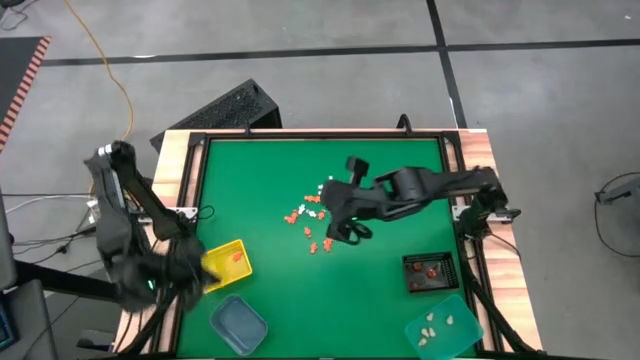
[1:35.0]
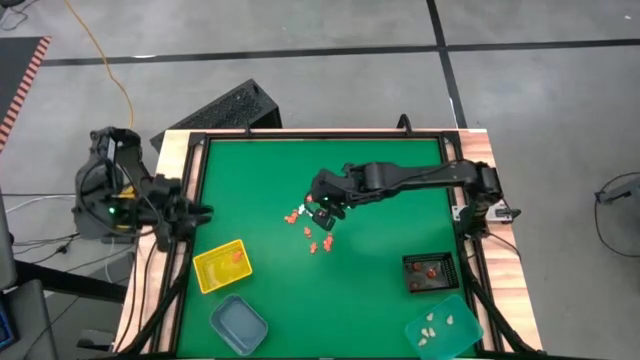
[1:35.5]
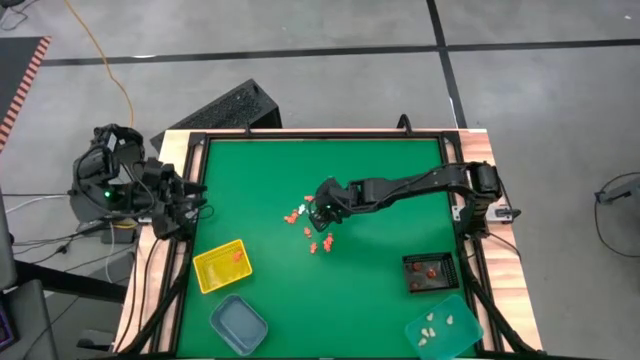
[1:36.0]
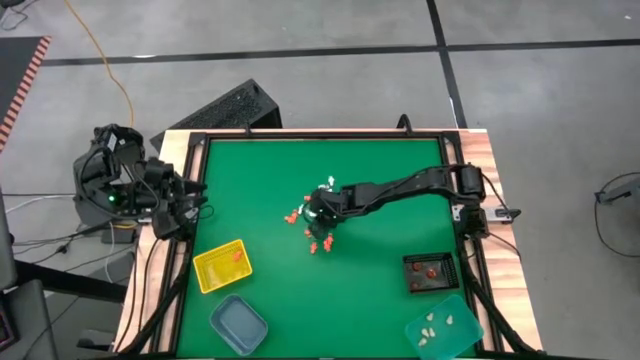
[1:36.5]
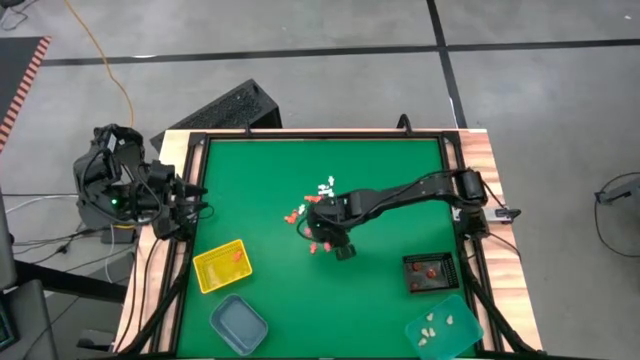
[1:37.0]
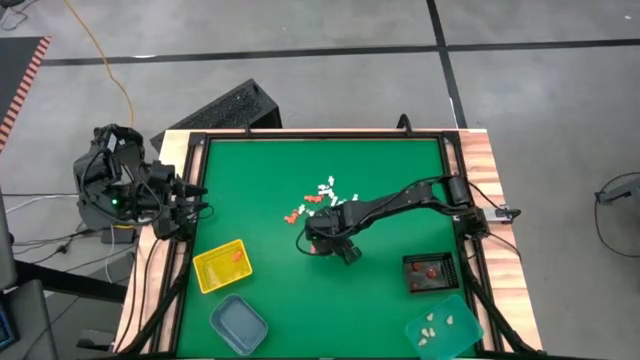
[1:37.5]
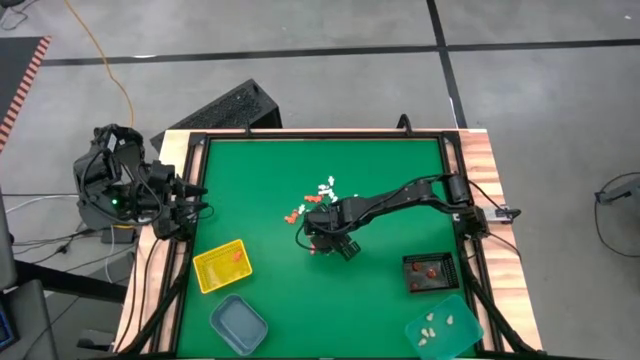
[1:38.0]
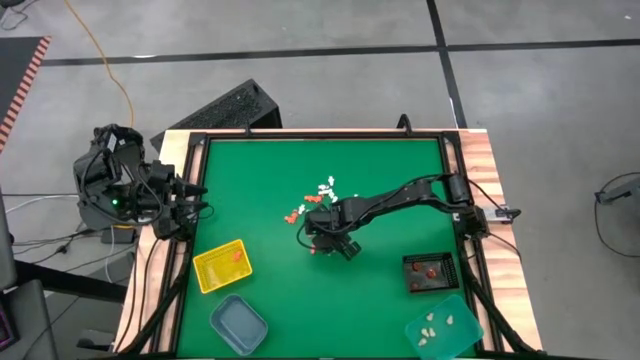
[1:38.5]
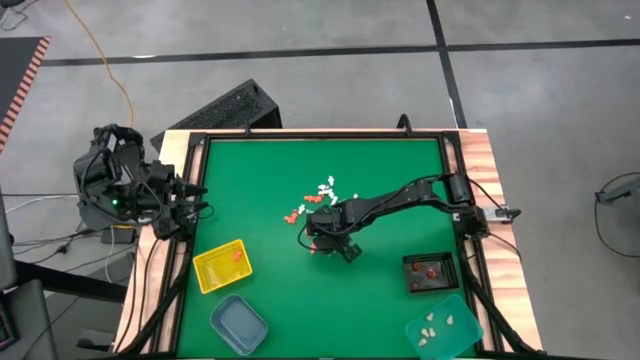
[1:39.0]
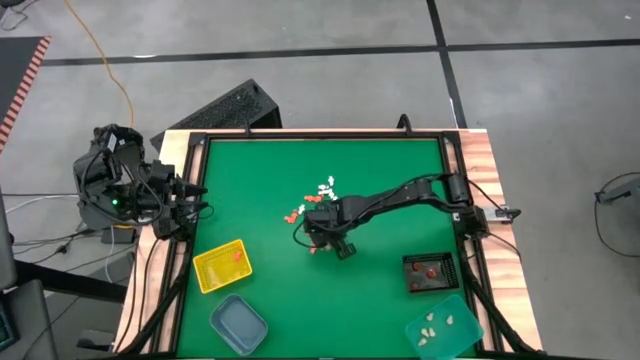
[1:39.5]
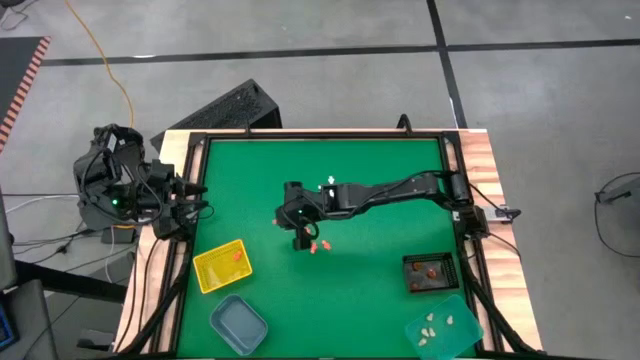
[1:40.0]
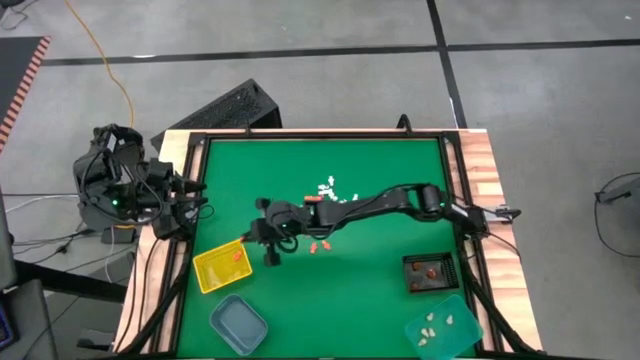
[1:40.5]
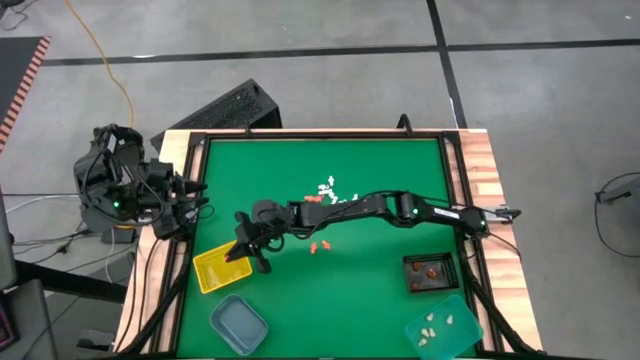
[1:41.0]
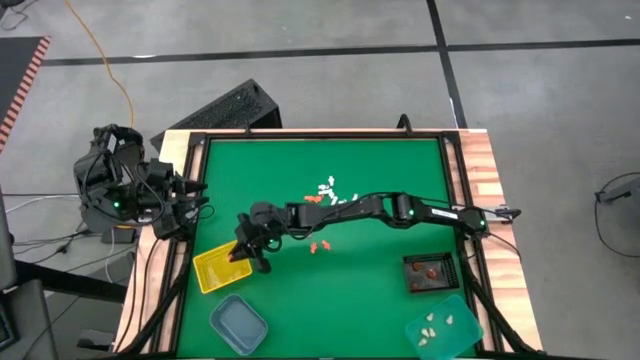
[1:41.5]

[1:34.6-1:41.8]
Task: Sort Halloween decoration
Put the orange skeleton model into the yellow bin

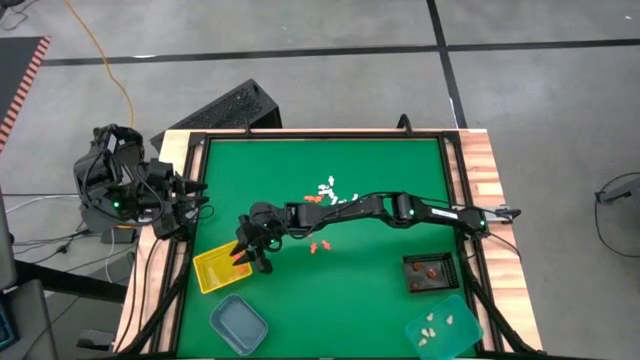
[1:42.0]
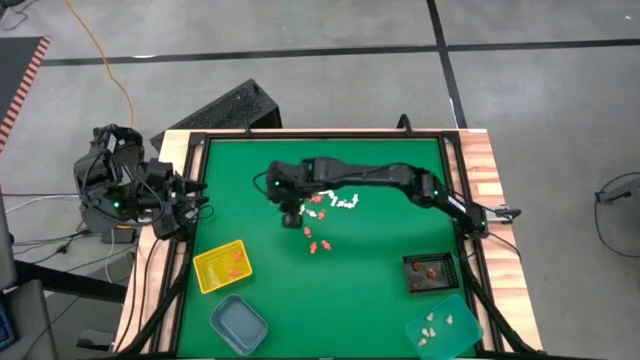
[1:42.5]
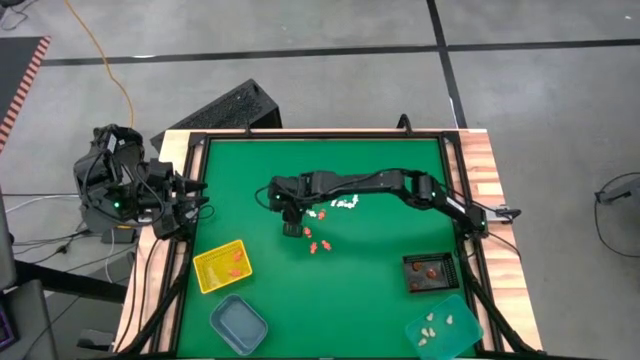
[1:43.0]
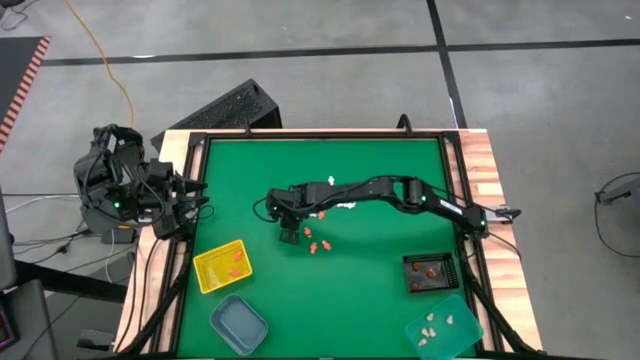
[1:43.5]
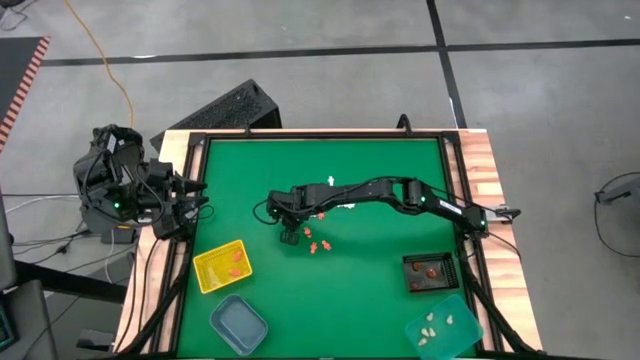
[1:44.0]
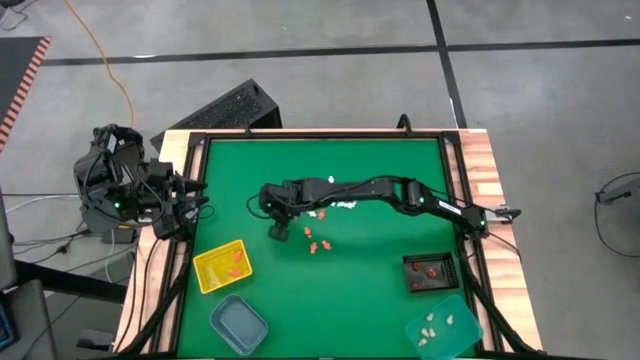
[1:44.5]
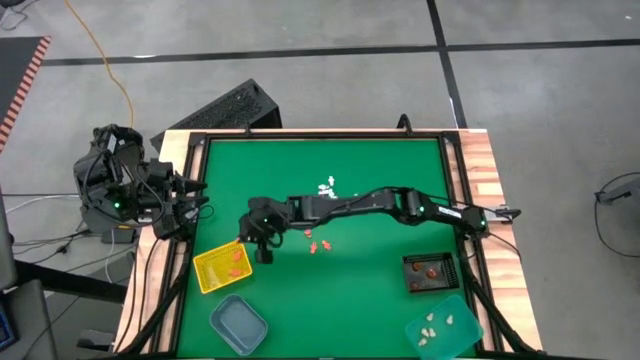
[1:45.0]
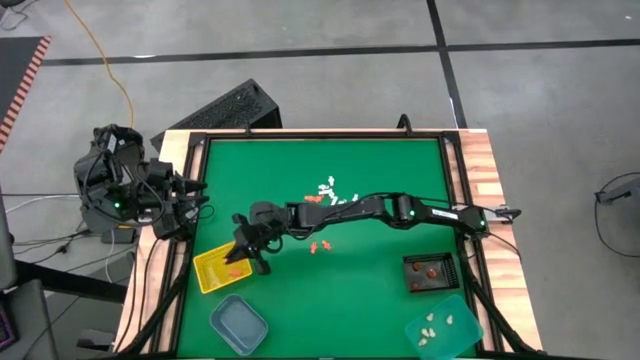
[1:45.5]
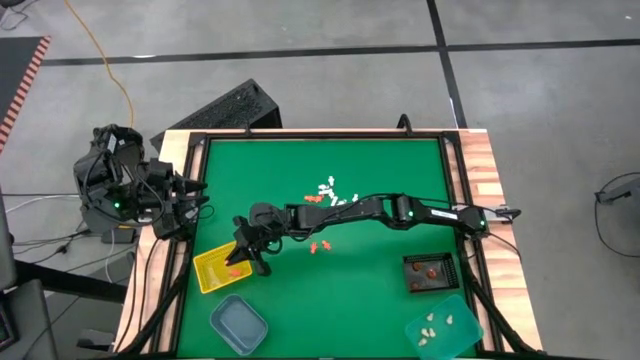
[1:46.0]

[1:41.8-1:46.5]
Put the orange skeleton model into the yellow bin

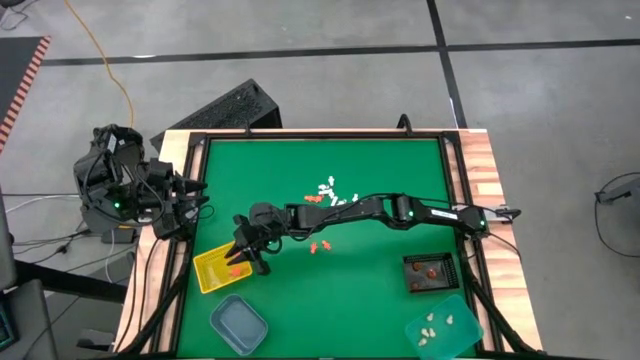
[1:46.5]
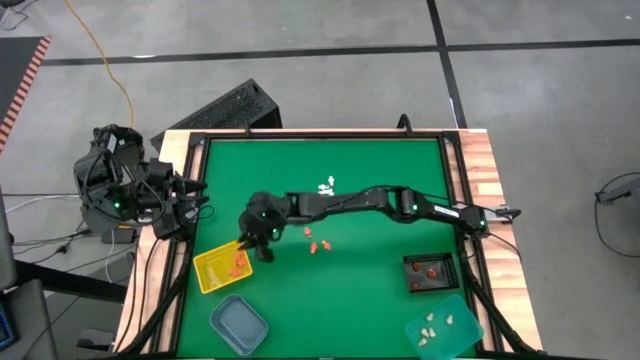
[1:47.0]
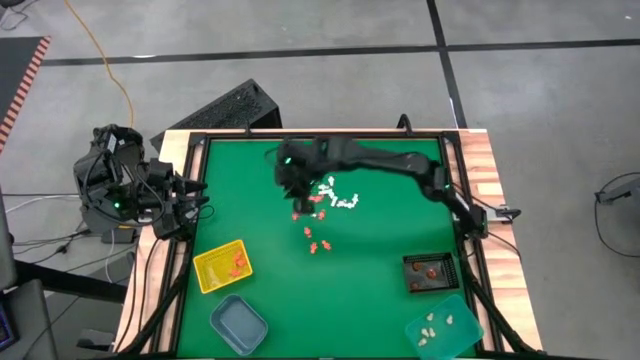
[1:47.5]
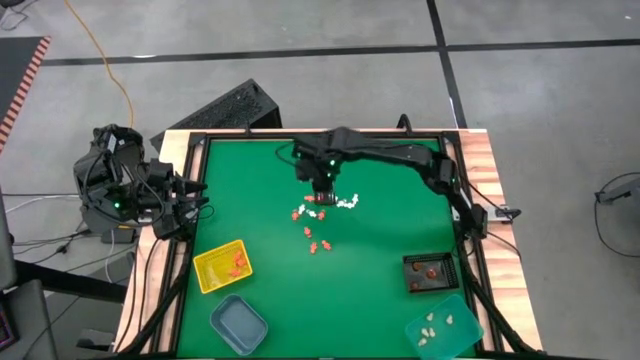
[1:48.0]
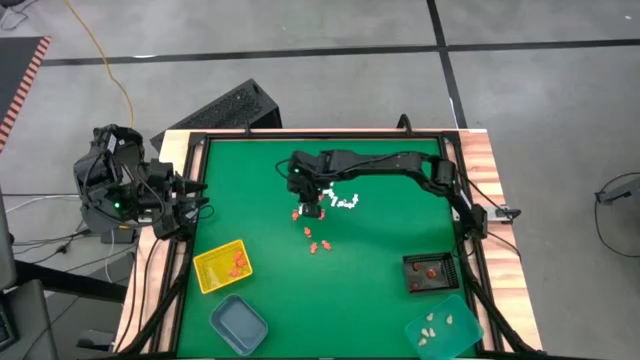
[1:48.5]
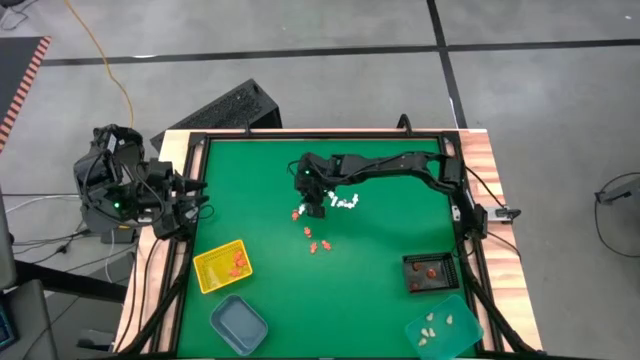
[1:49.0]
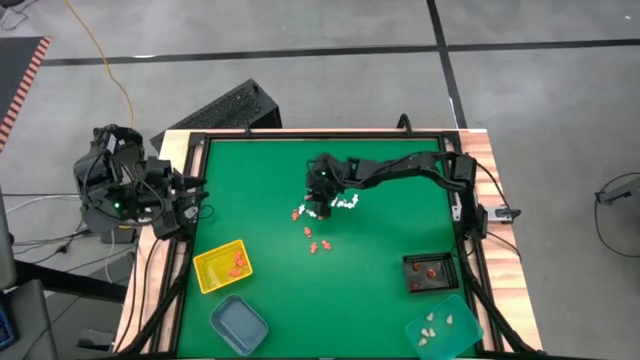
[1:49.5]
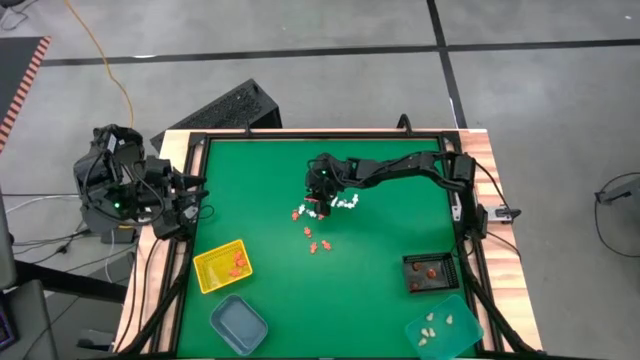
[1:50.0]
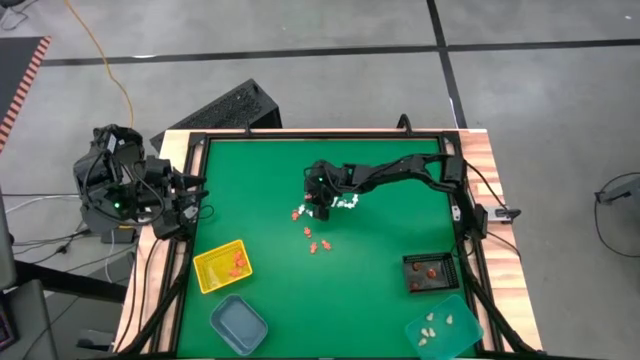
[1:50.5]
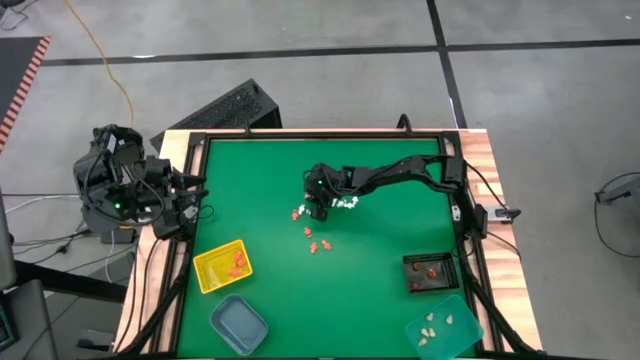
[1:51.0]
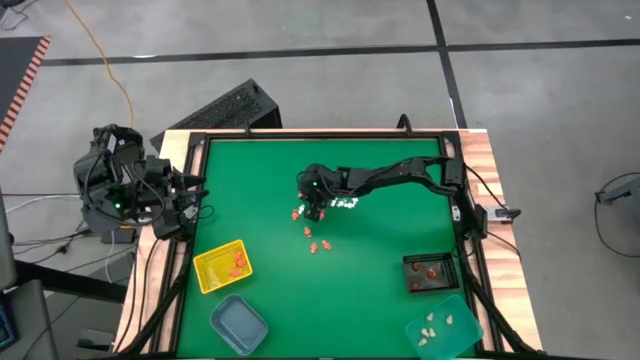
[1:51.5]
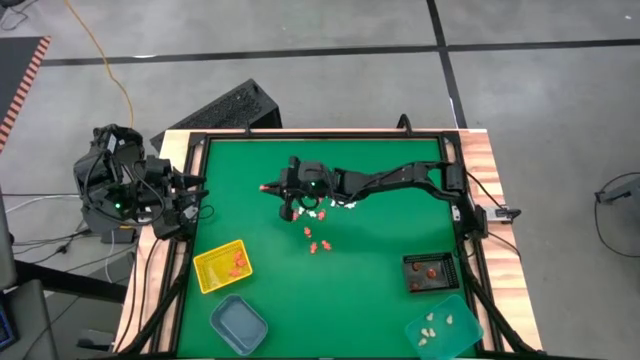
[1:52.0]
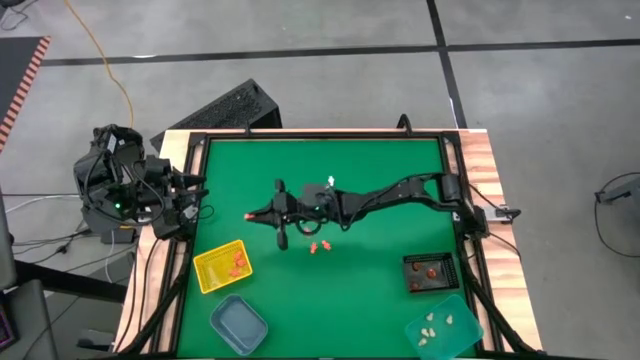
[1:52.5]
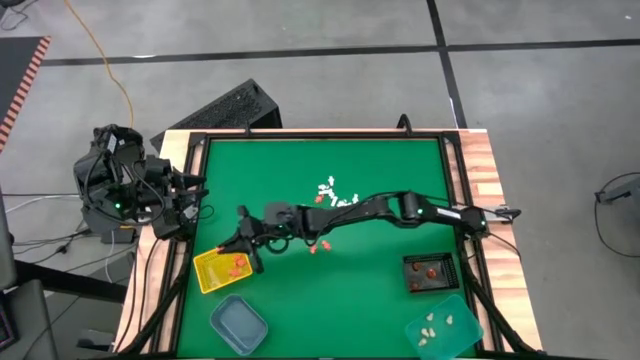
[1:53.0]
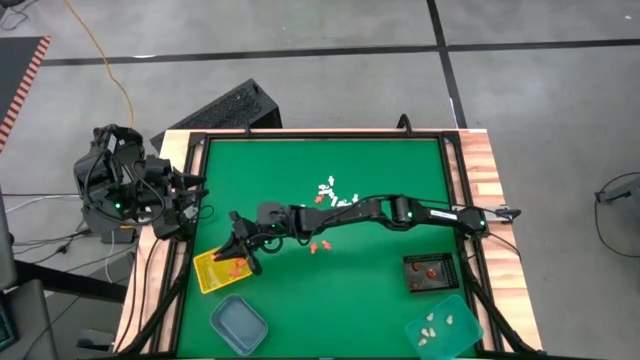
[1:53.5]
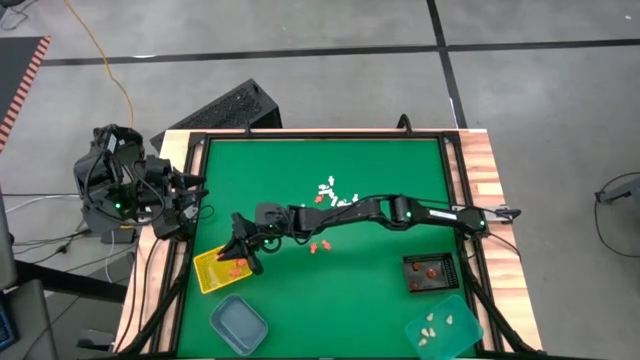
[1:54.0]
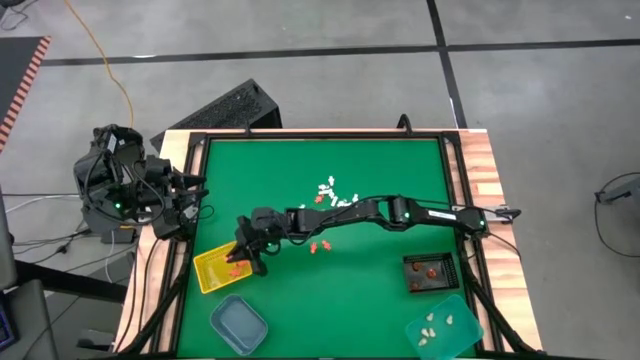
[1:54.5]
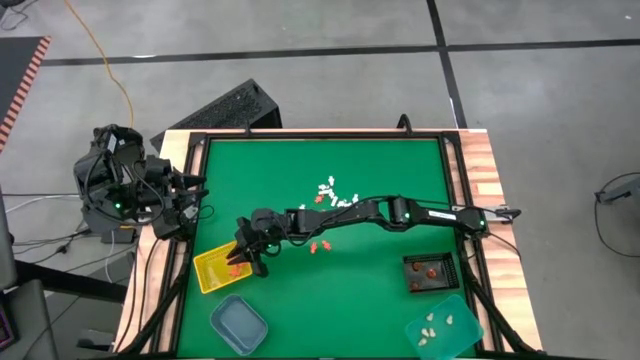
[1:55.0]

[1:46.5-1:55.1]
Put the orange skeleton model into the yellow bin

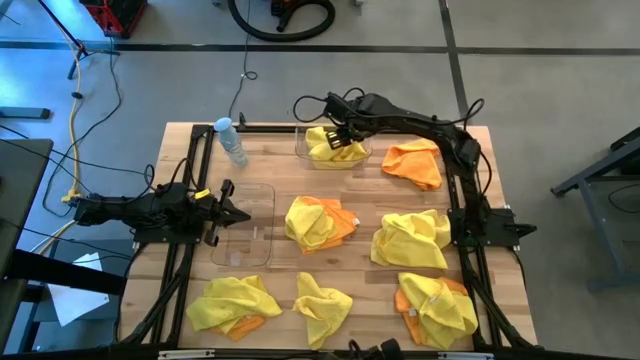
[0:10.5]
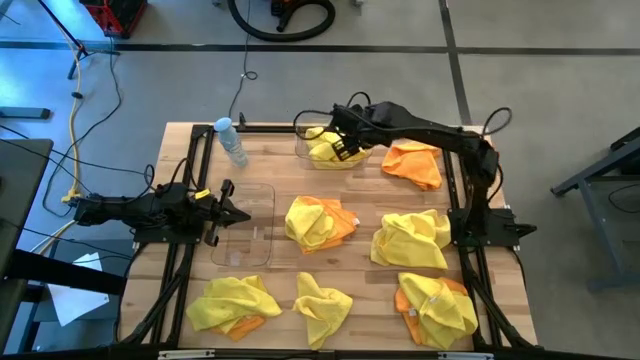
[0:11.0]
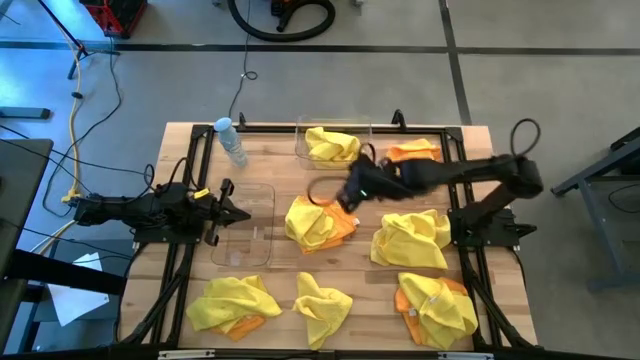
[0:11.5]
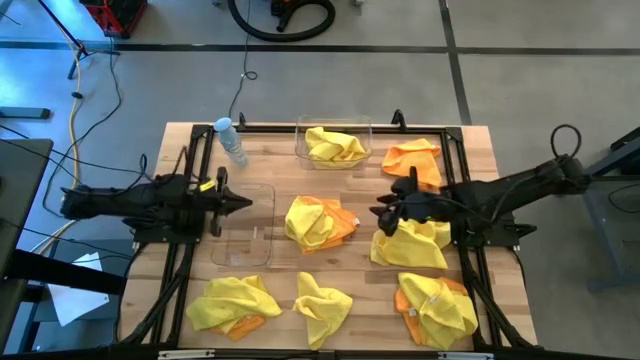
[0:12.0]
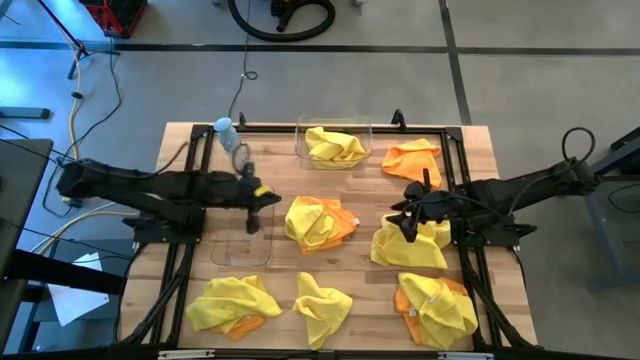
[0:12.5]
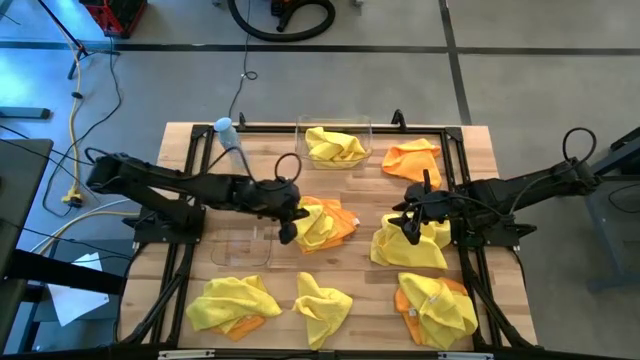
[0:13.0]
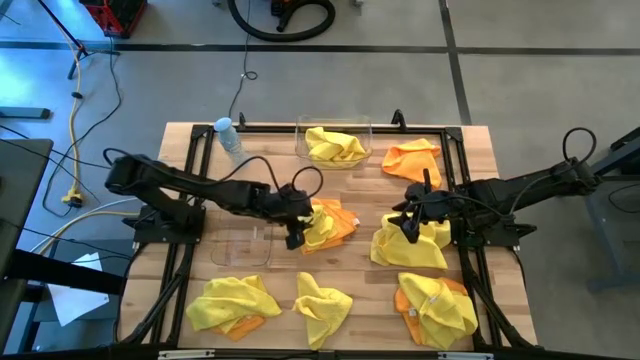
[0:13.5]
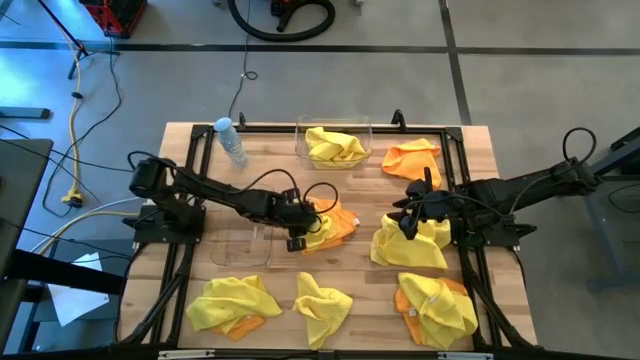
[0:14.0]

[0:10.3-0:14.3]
Task: Sort microfiber towel by color & place in baskets
Put the yellow microfiber towel into the top transparent bin
